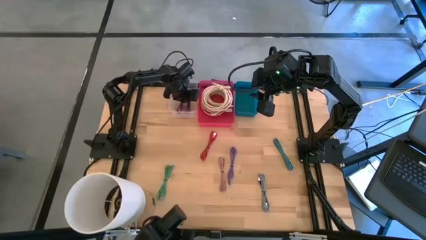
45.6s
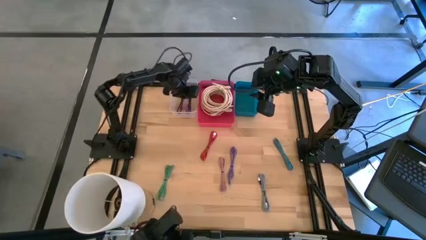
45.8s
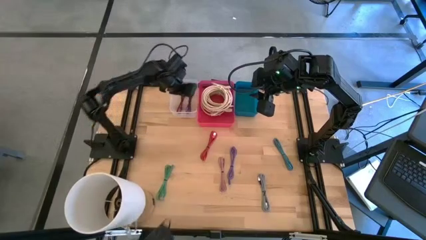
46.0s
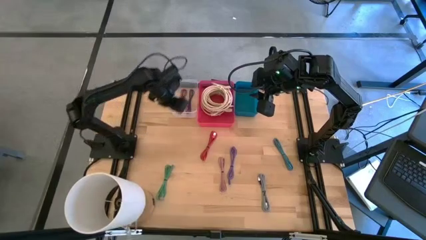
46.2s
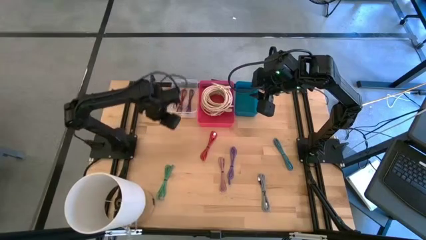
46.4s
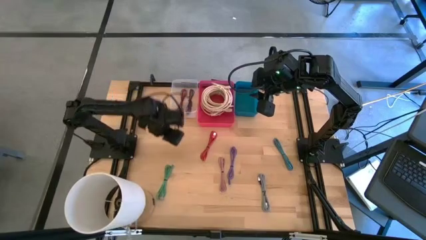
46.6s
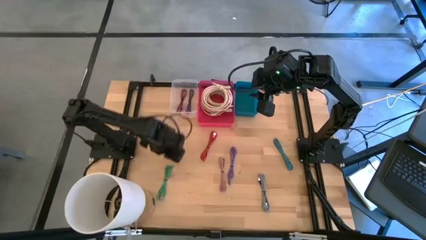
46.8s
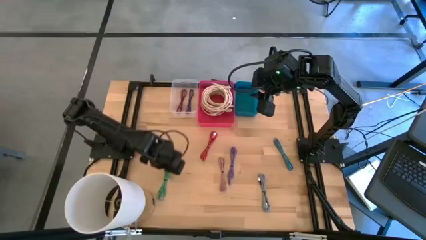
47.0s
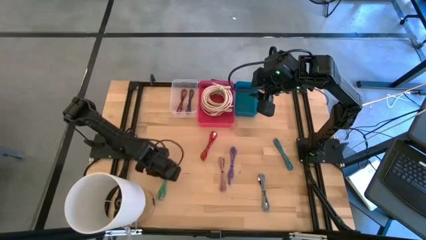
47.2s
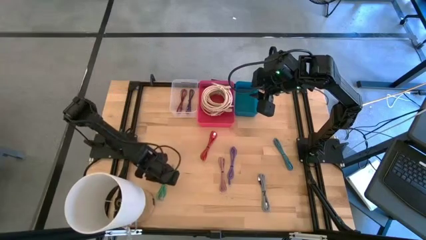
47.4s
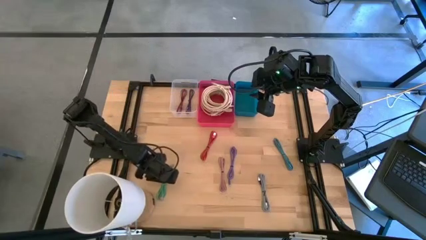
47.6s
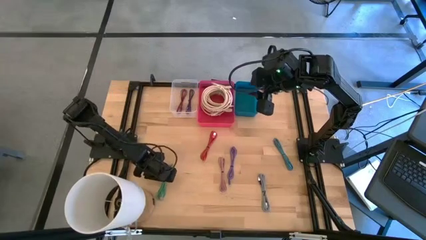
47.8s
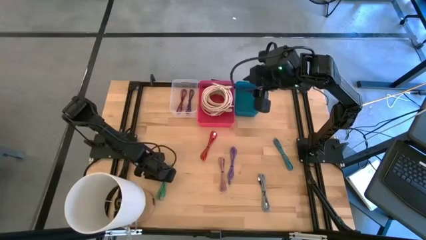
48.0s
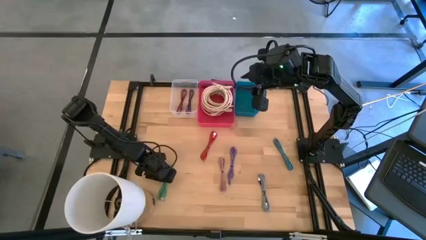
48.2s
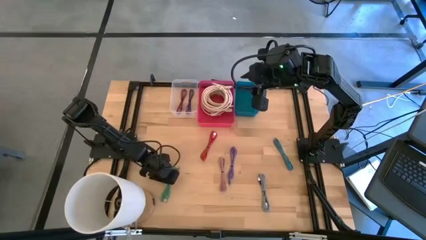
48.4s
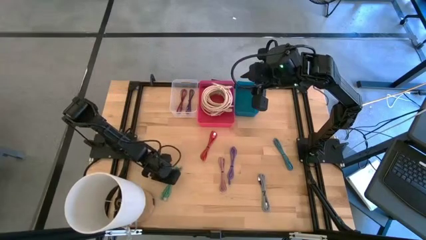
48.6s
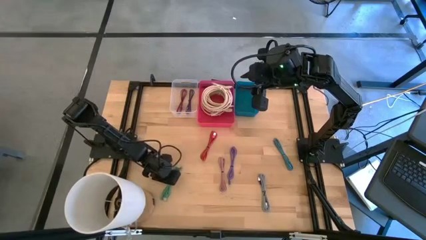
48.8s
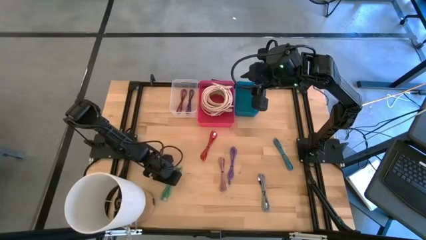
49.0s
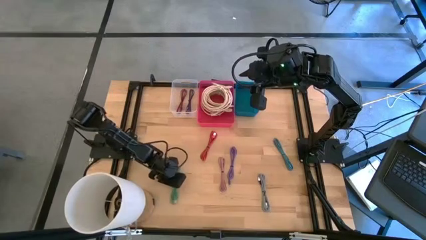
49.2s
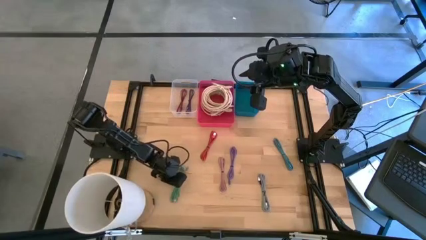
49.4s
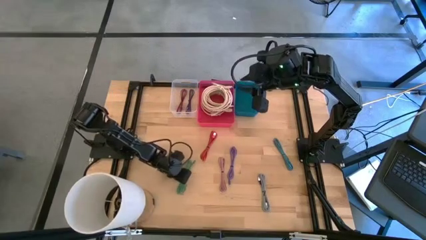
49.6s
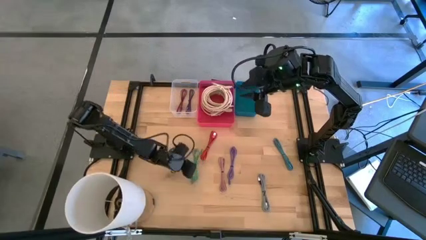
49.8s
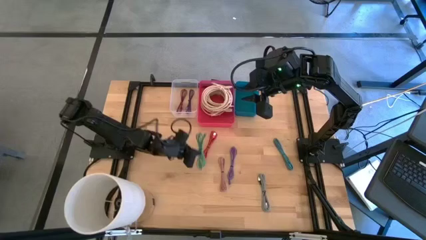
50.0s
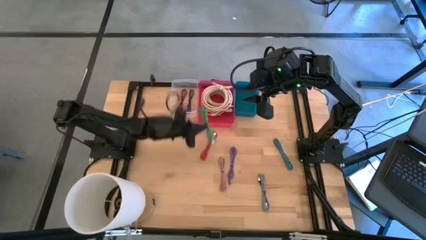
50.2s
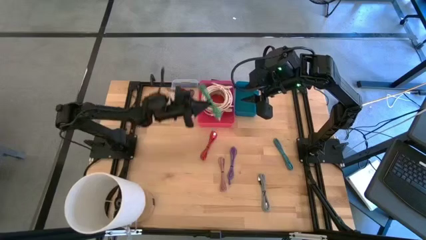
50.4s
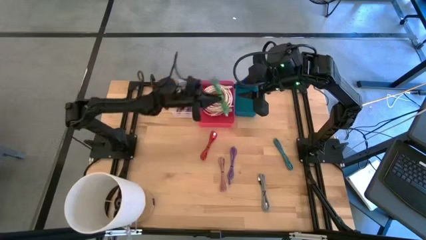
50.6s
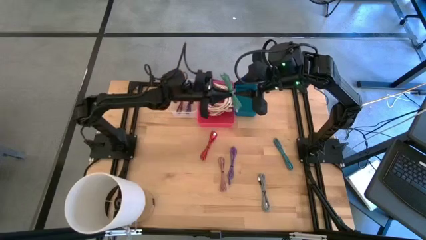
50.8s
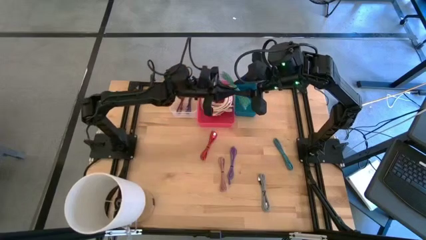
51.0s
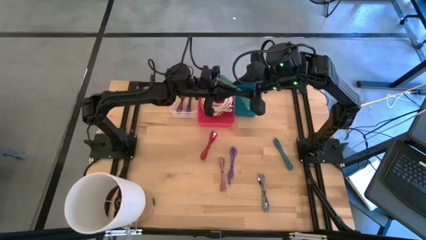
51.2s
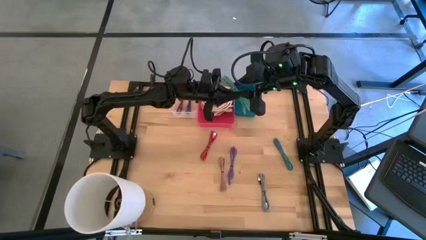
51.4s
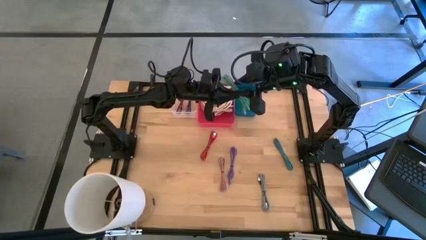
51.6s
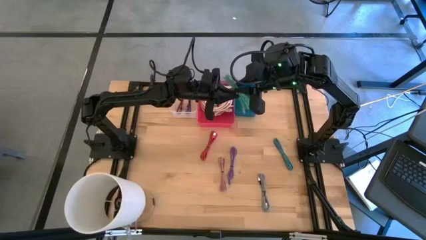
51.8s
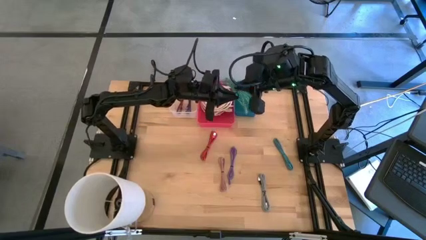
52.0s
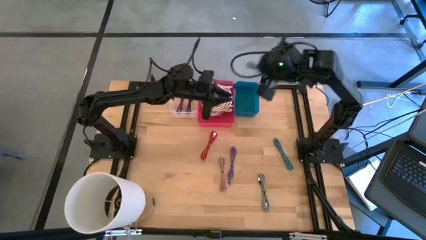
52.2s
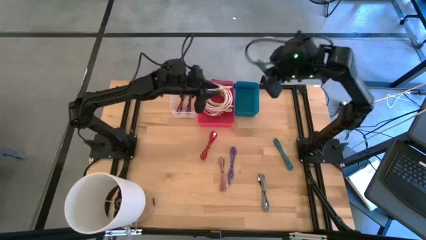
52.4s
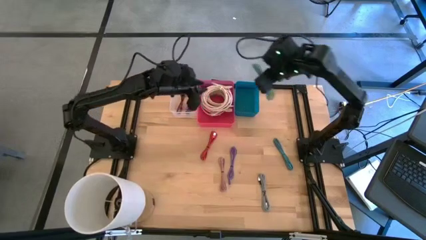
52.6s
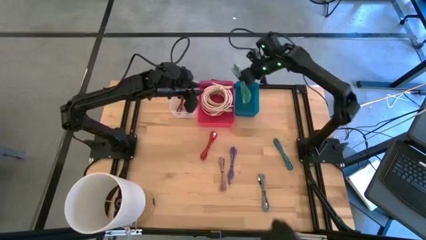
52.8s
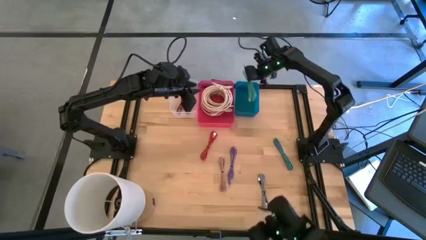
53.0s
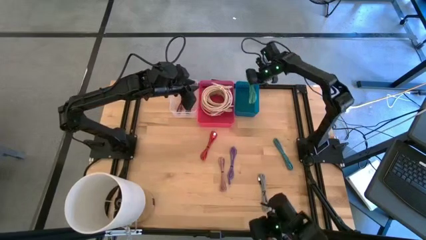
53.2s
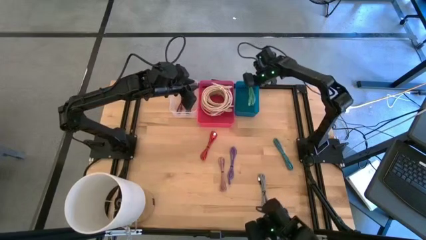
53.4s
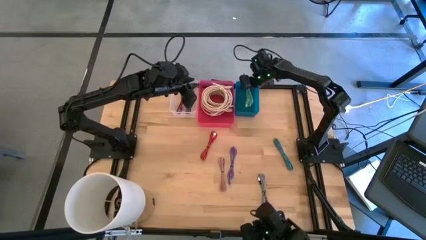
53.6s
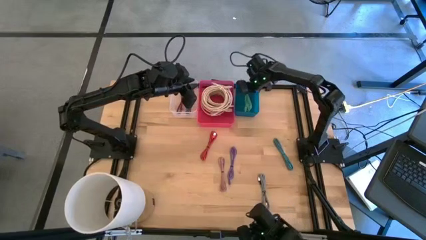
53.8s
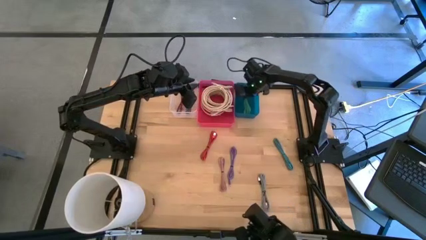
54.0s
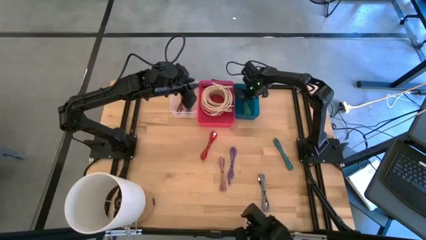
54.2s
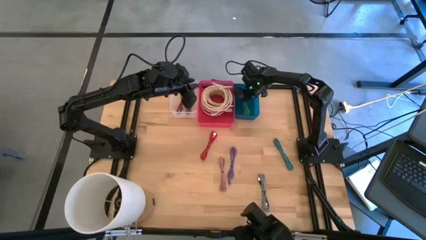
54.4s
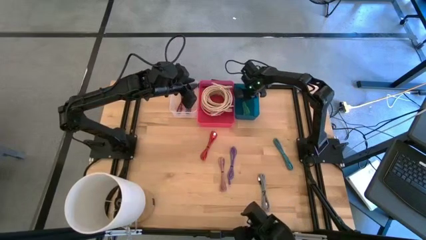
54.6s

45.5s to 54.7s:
Task: Pick & Place USB Port
Put the green charger cable into the blue bin

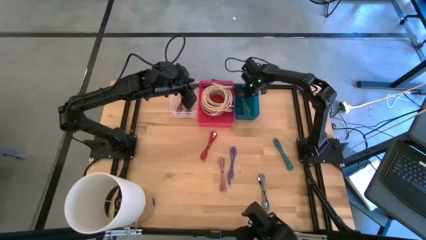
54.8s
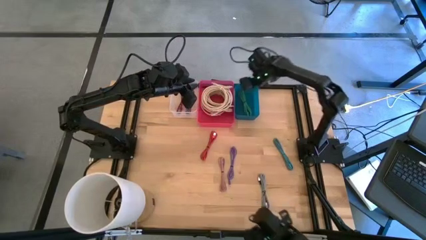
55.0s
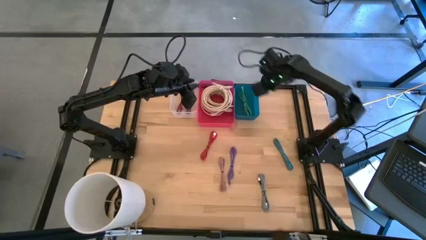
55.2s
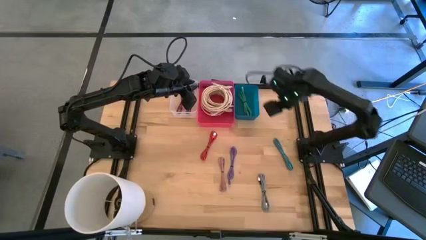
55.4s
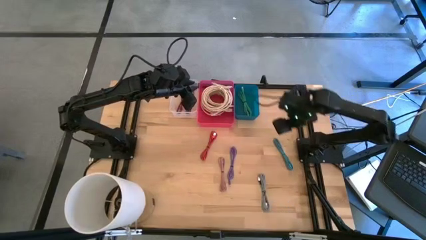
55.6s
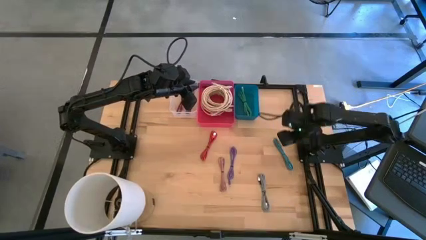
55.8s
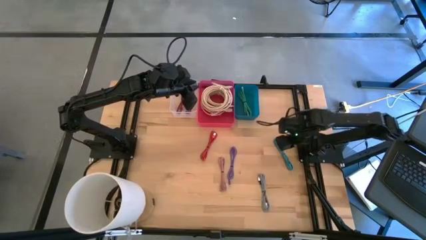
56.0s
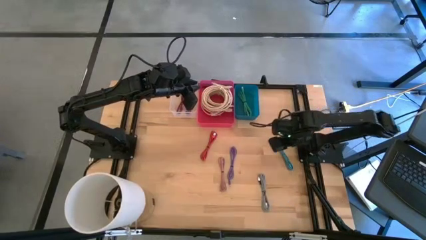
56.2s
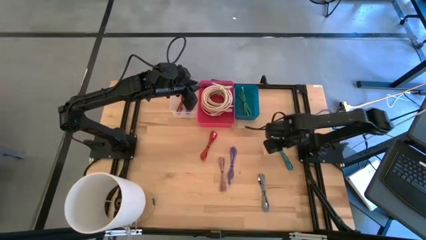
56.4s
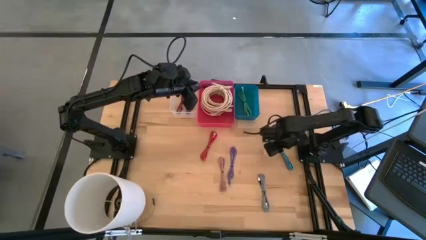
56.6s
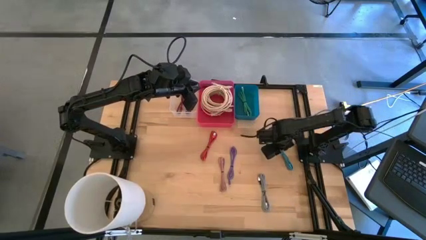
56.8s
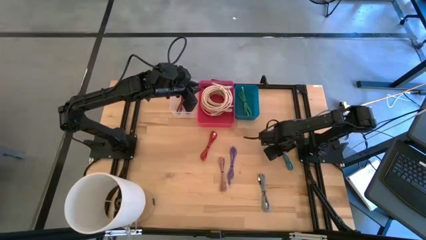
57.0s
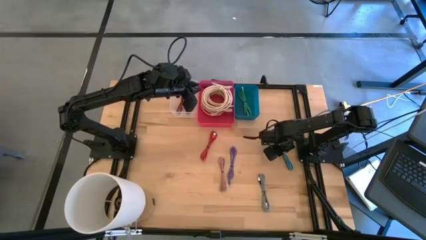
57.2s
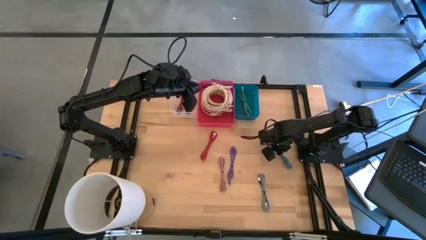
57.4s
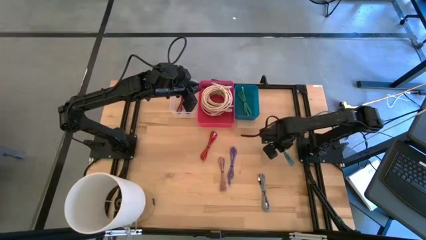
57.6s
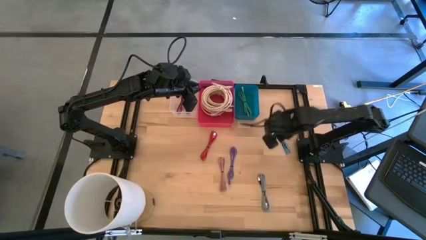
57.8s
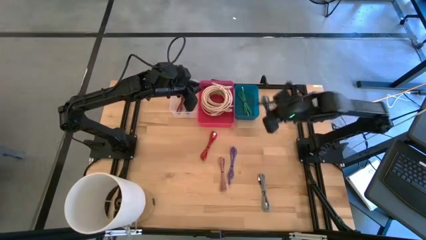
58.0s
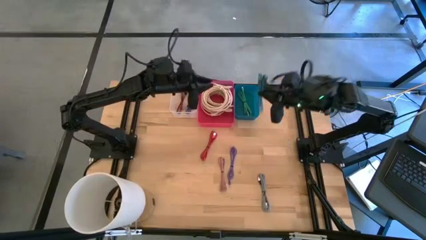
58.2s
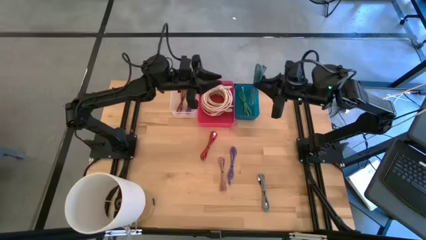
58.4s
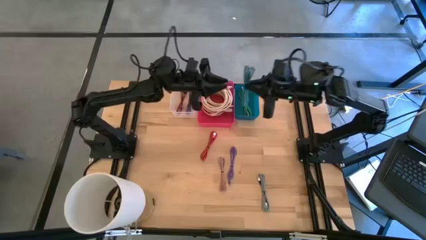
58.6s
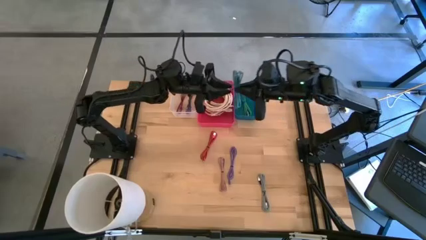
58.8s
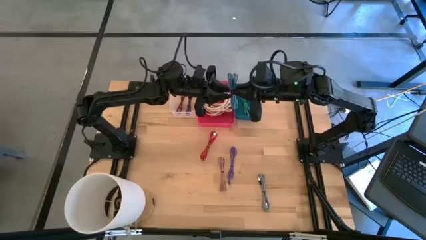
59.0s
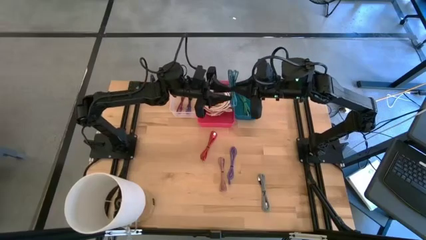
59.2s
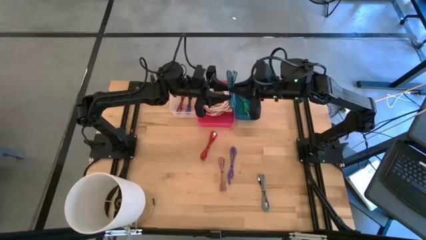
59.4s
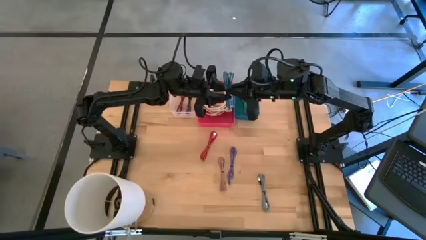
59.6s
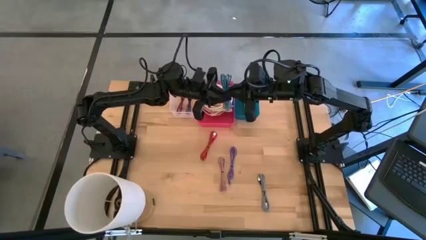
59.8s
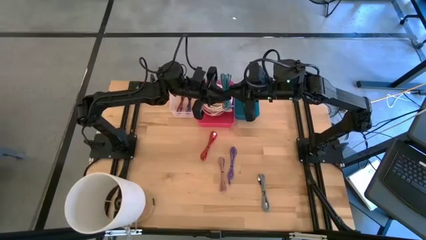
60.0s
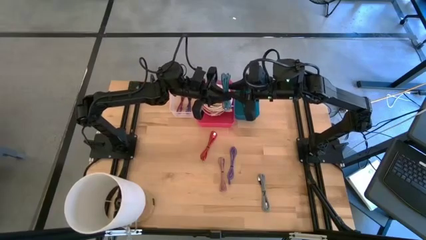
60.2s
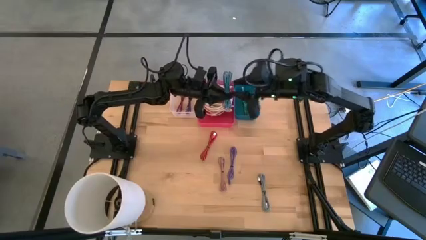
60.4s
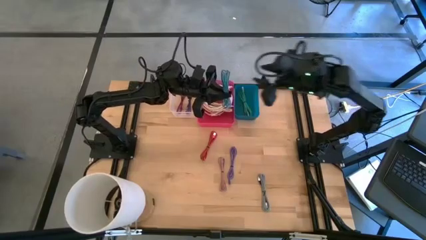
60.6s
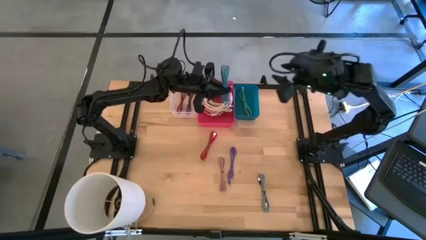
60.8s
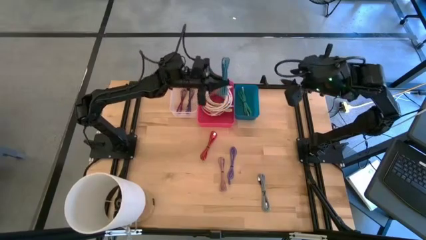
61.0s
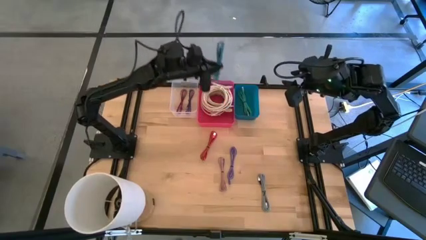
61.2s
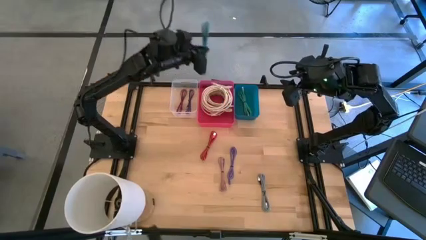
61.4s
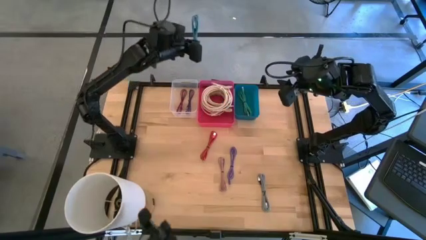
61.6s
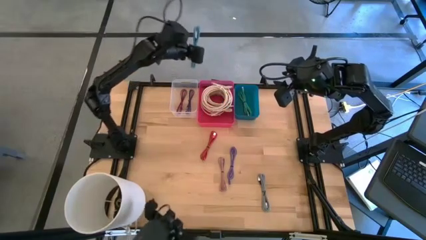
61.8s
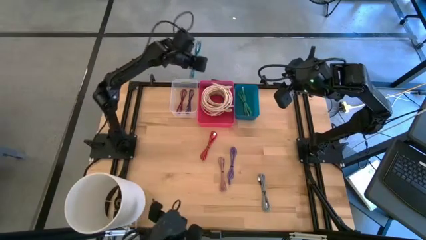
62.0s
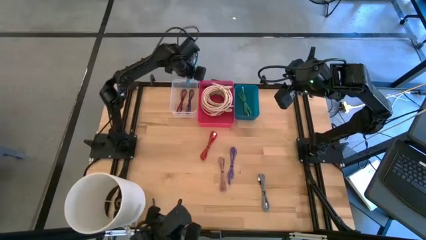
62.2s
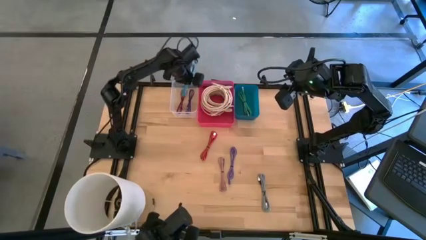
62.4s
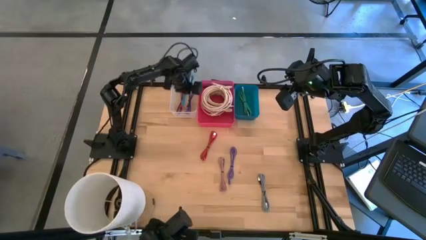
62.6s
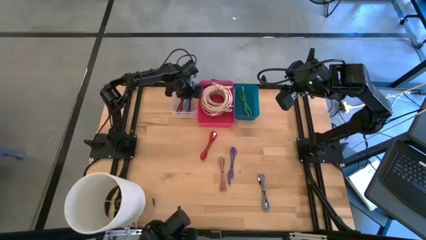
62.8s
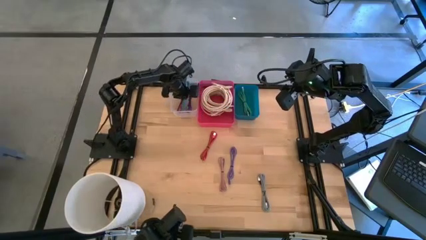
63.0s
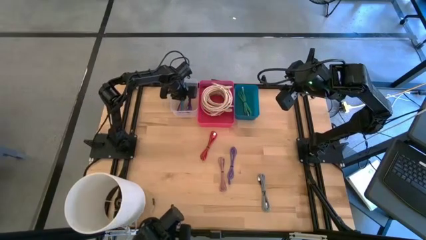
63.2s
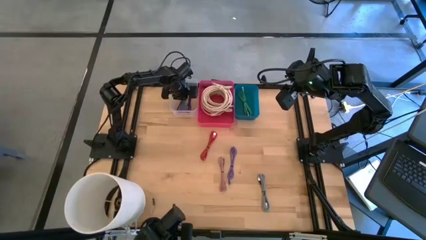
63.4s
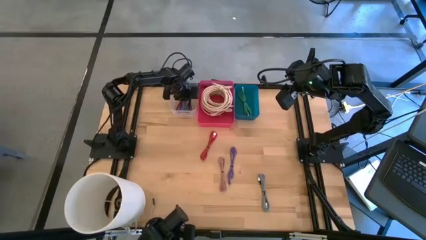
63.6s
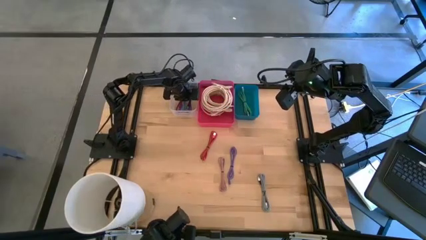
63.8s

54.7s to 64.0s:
Put the blue charger cable into the transparent bin
